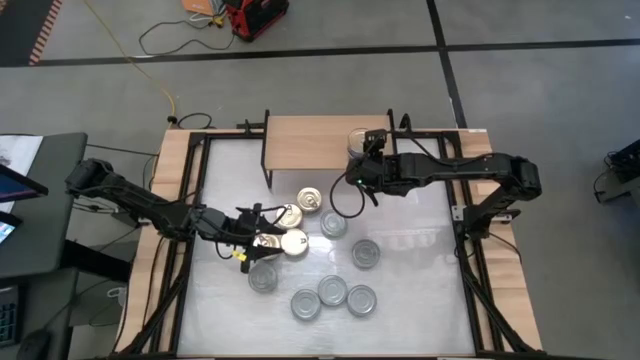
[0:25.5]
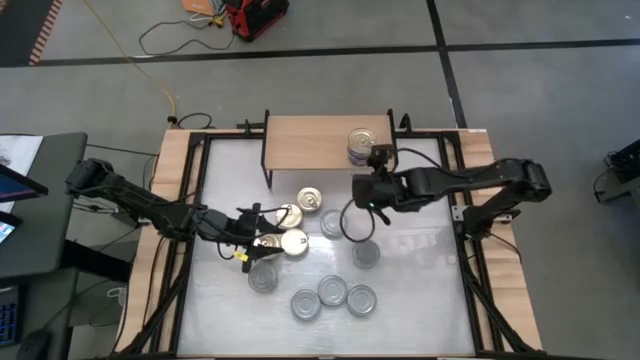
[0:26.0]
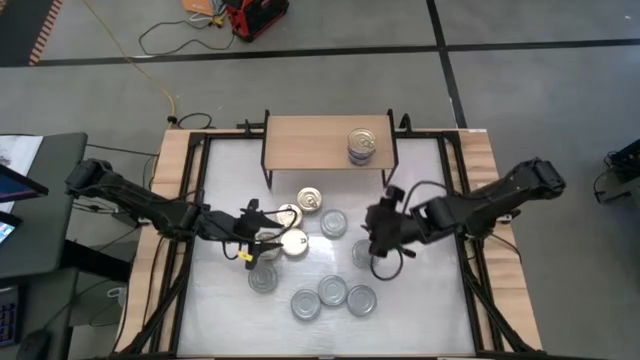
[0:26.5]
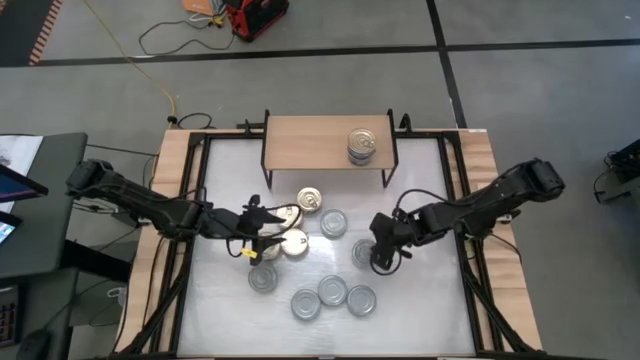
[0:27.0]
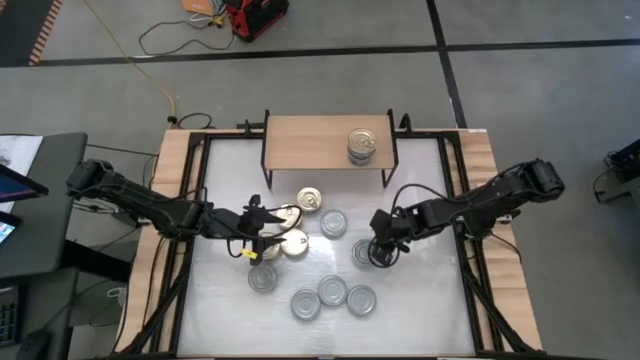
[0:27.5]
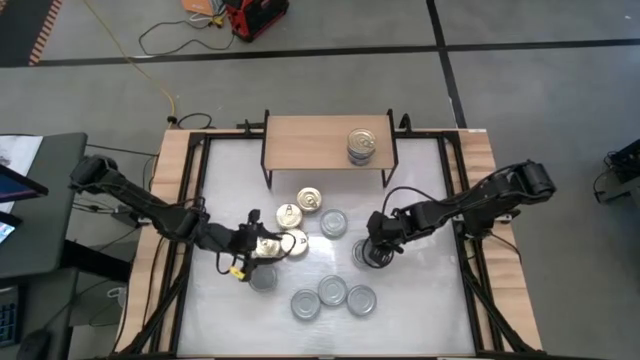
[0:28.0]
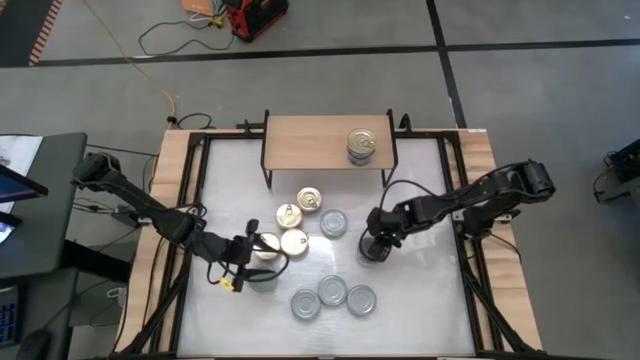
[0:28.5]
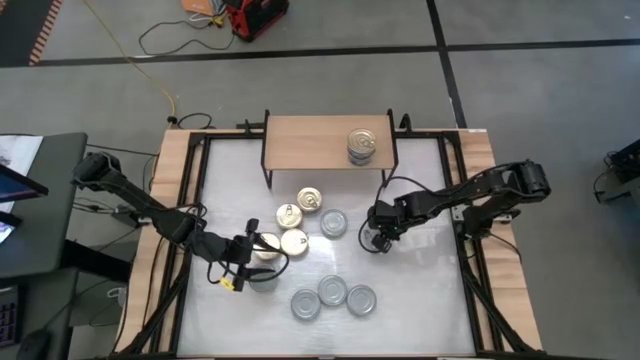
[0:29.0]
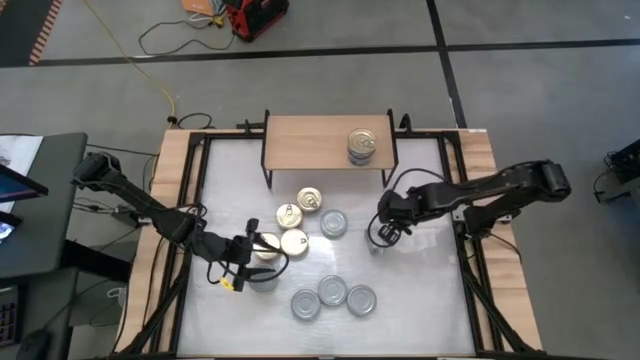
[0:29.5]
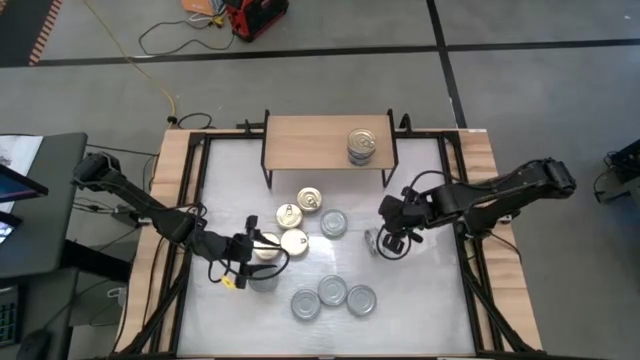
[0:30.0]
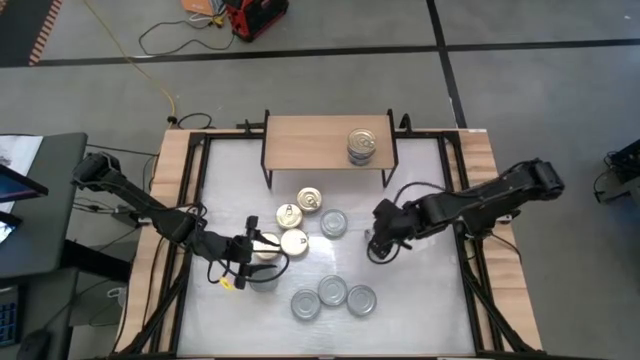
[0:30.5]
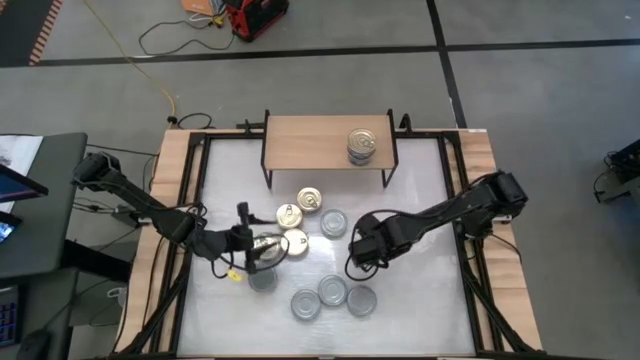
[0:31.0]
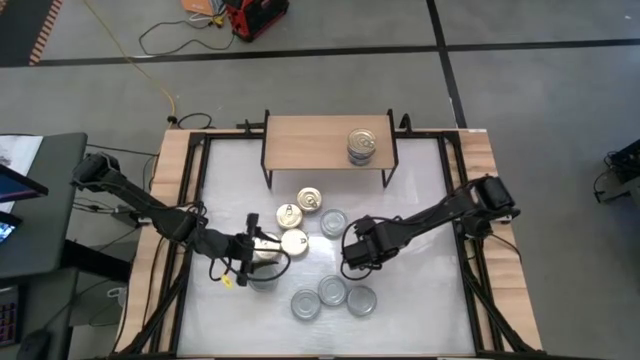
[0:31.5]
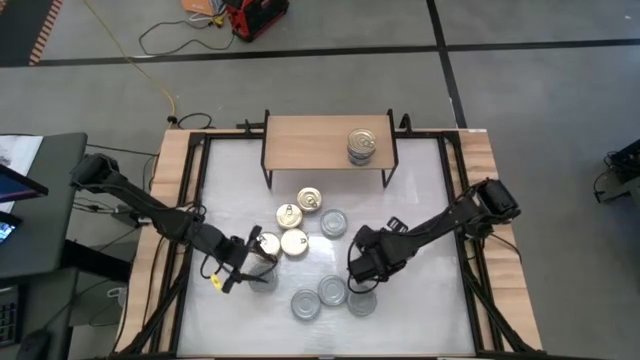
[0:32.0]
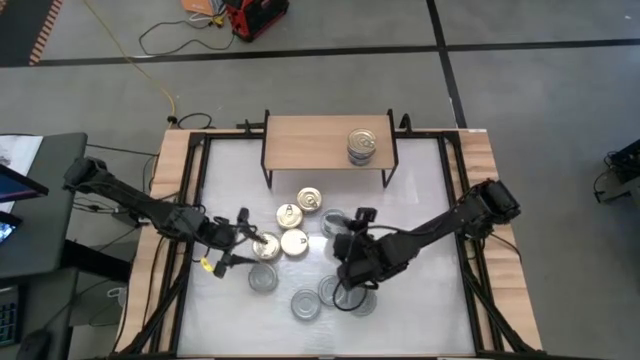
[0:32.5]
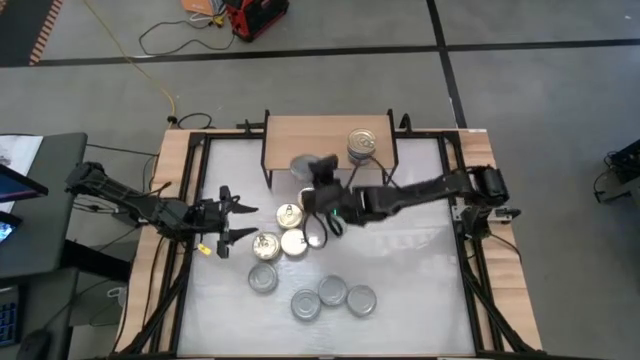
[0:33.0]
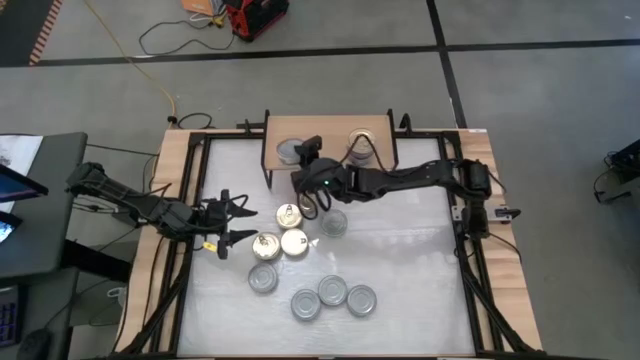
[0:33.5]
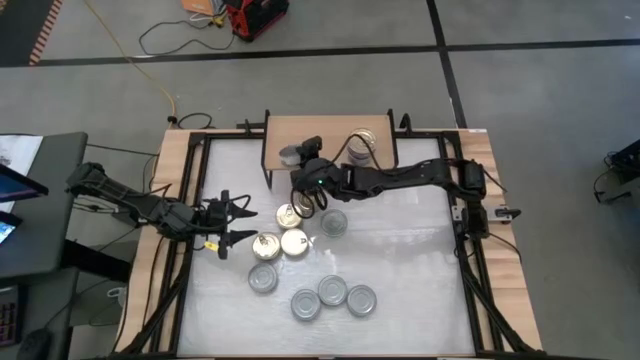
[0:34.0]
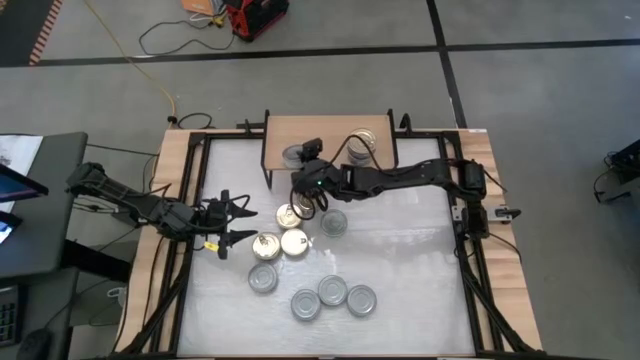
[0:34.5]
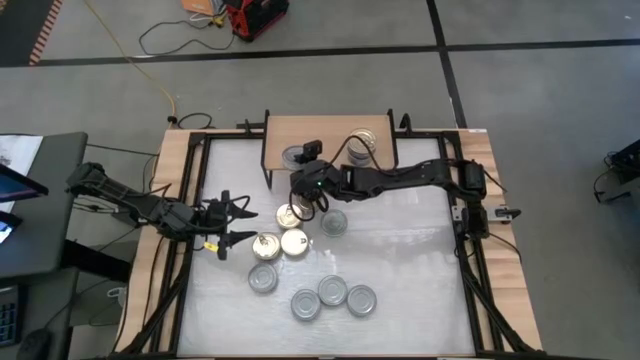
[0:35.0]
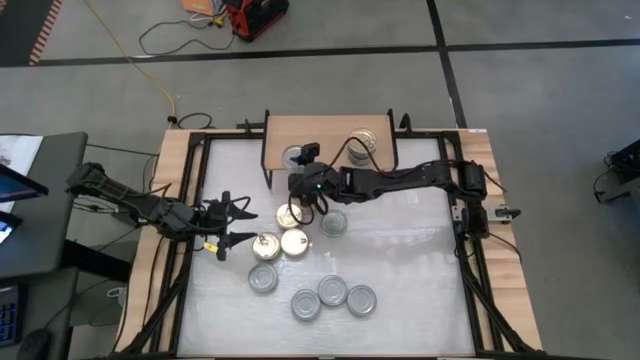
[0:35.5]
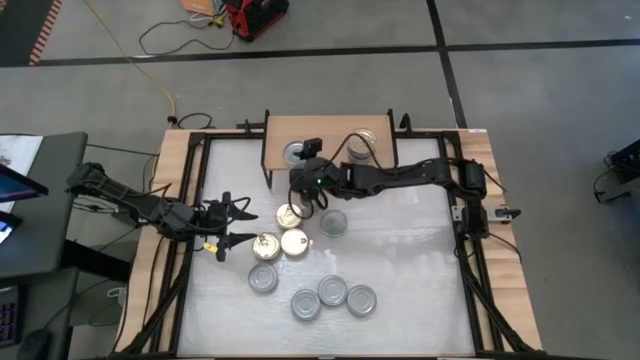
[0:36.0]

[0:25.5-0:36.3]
Task: Stack canned seafood by type on shelf
Put the green white tuna can on the shelf

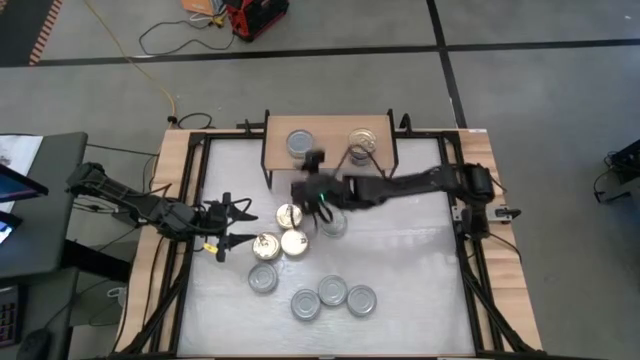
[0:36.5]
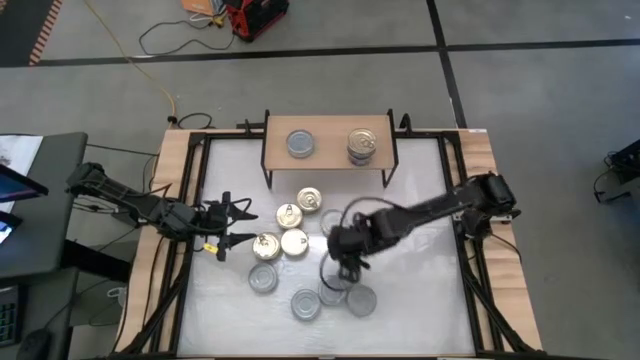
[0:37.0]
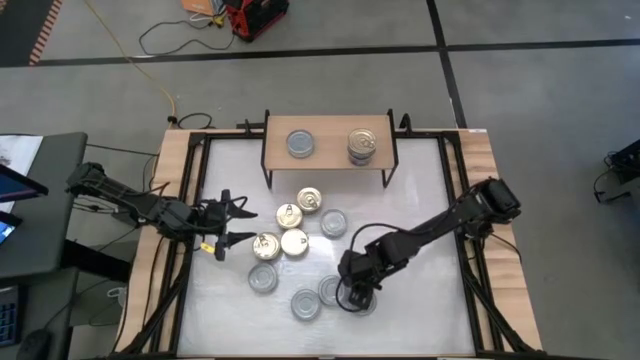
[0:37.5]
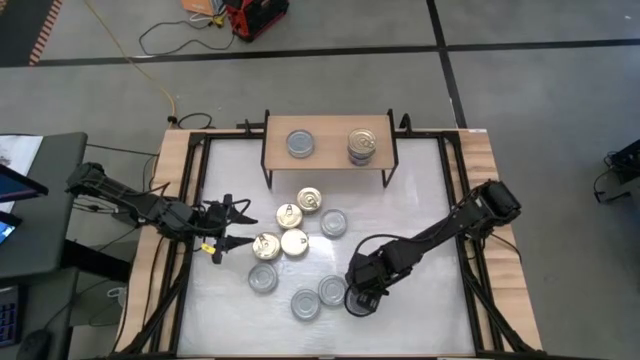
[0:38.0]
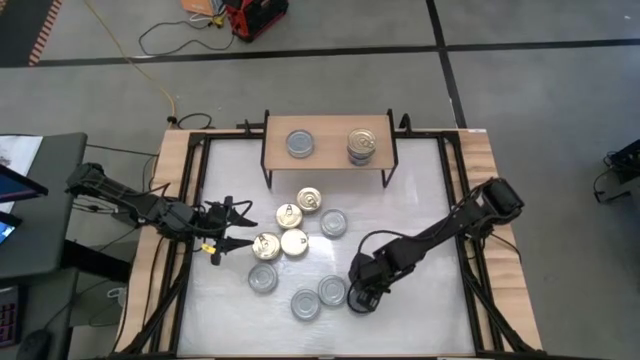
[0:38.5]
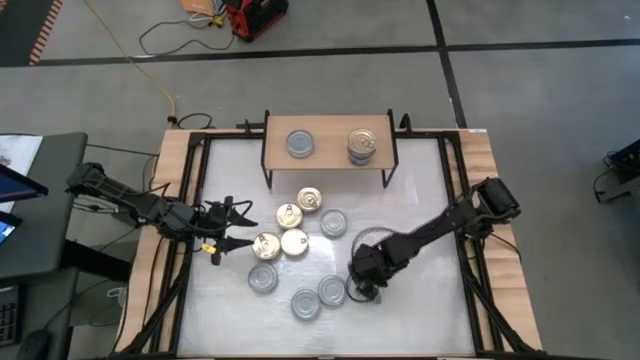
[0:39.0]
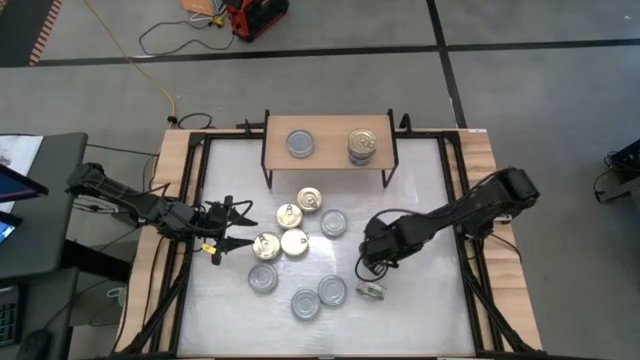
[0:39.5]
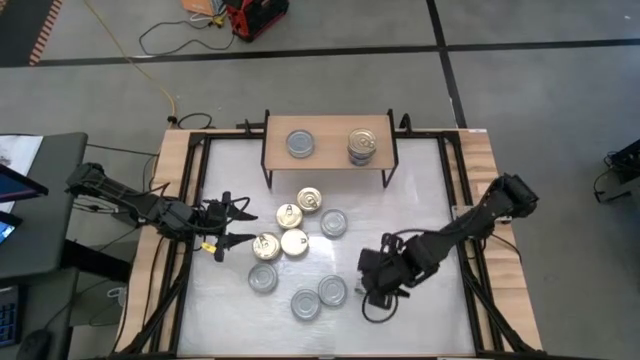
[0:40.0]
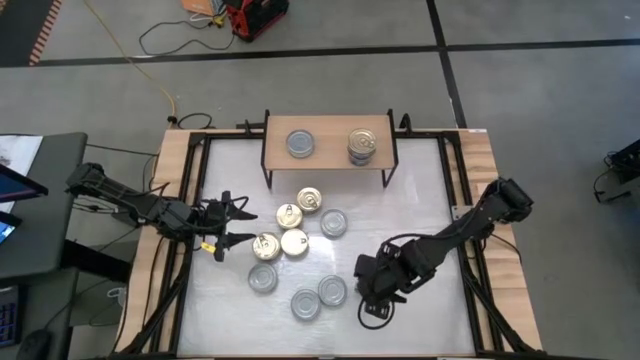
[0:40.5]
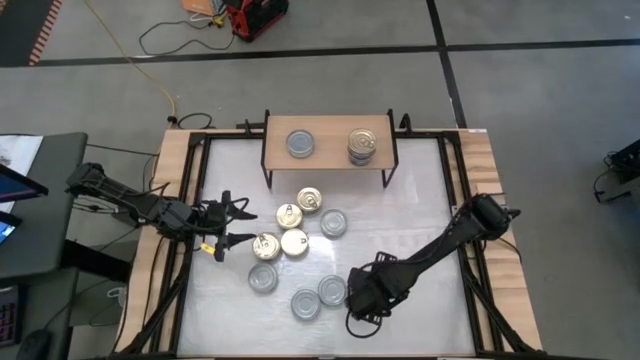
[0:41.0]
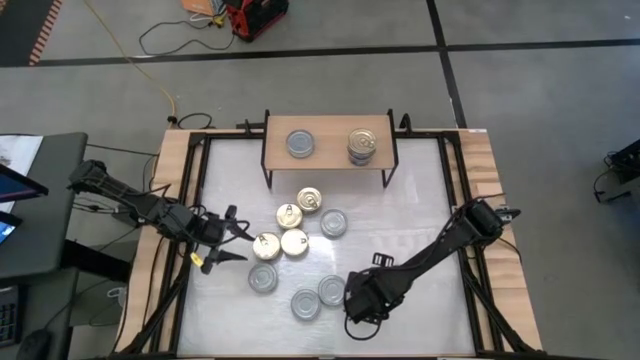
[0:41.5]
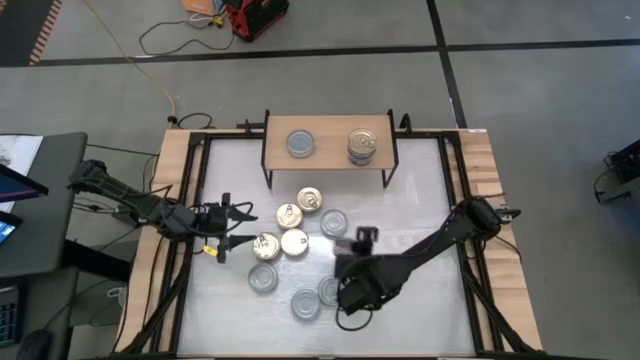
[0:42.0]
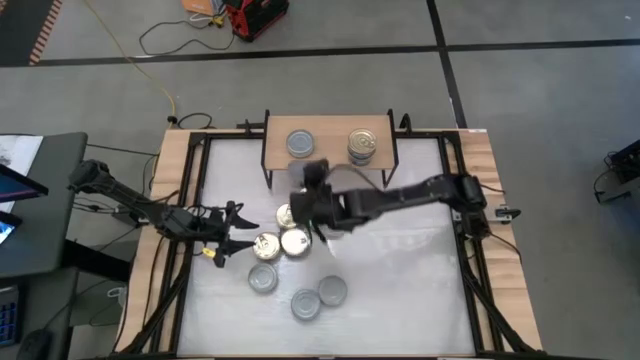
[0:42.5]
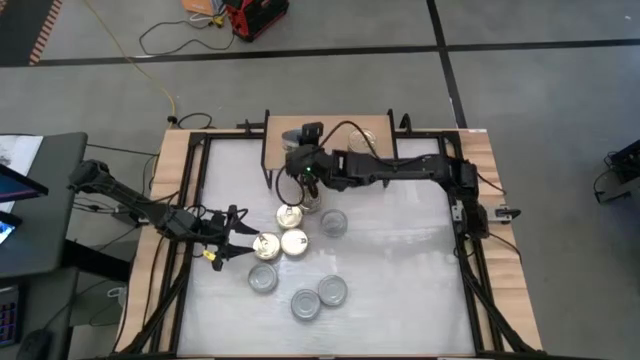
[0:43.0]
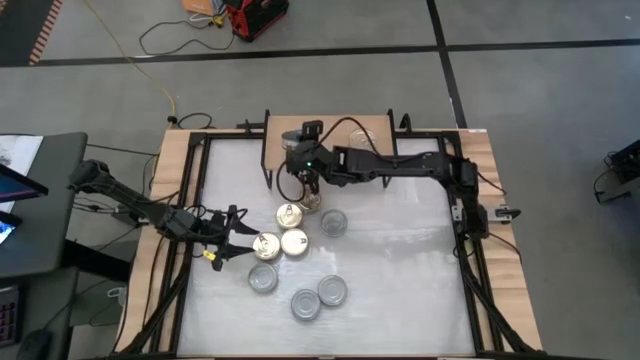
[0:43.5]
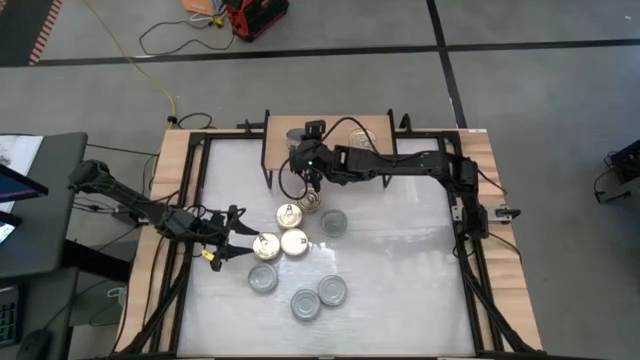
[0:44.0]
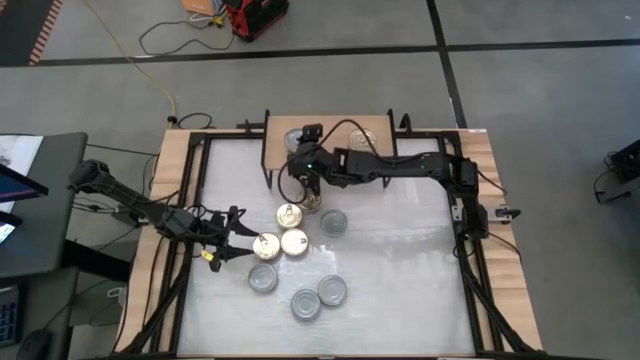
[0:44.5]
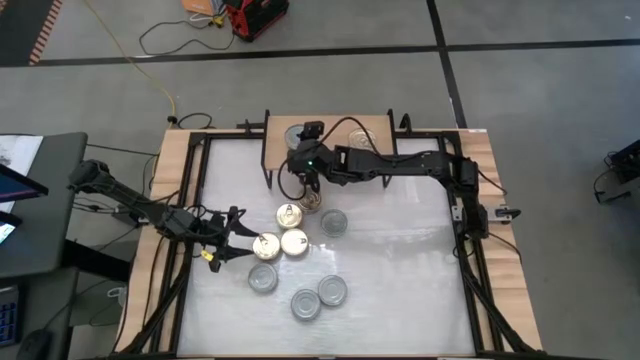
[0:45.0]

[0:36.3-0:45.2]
Stack the green white tuna can on top of the other green white tuna can on the shelf

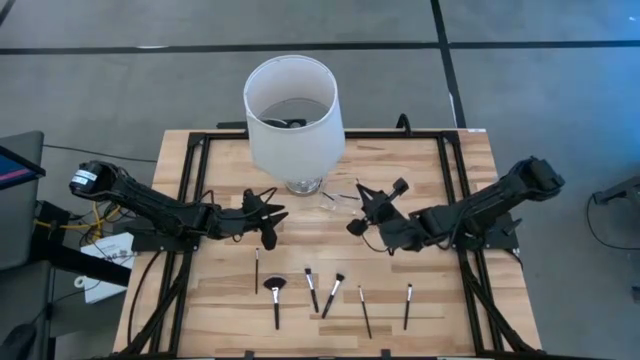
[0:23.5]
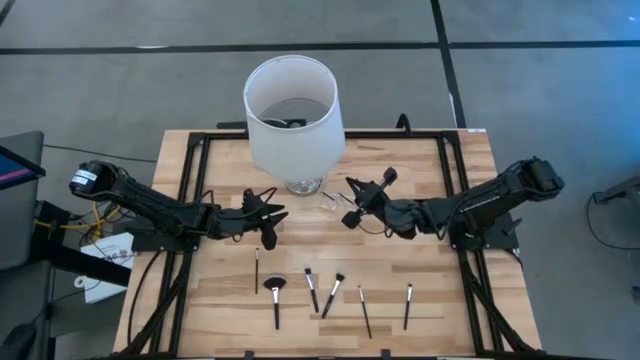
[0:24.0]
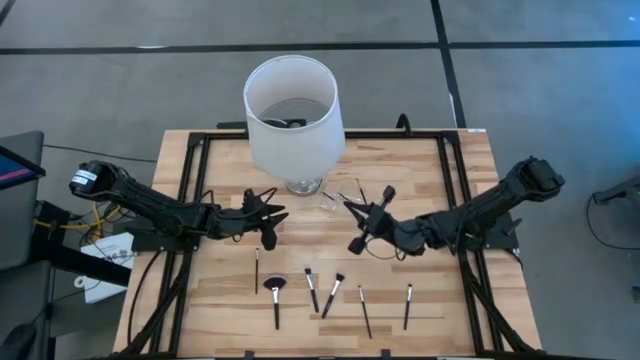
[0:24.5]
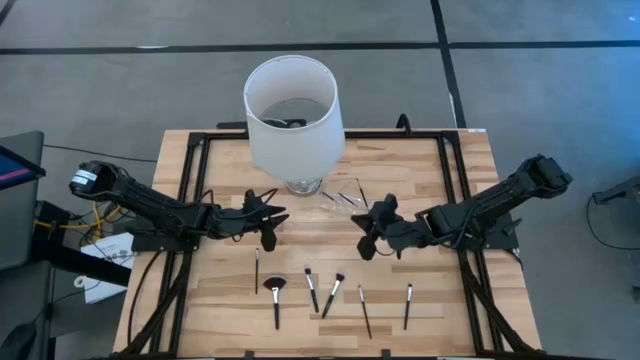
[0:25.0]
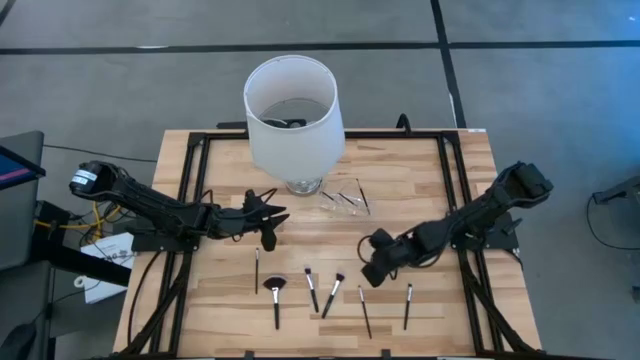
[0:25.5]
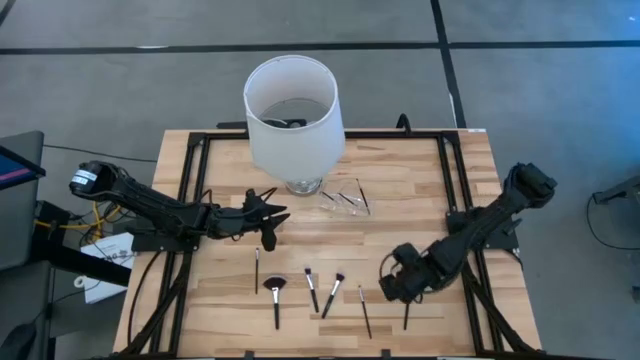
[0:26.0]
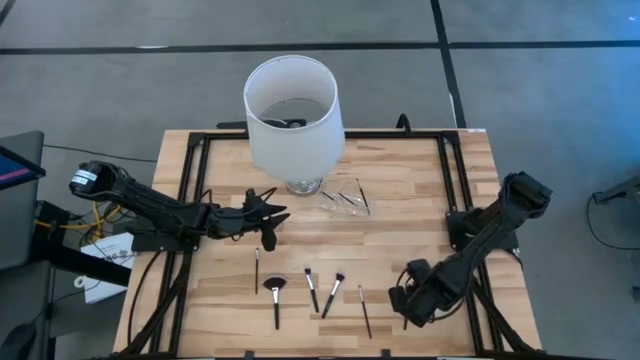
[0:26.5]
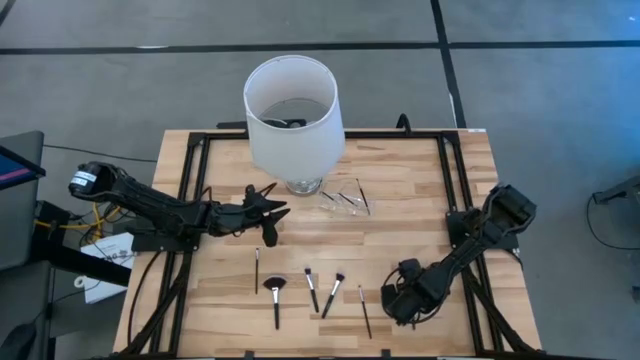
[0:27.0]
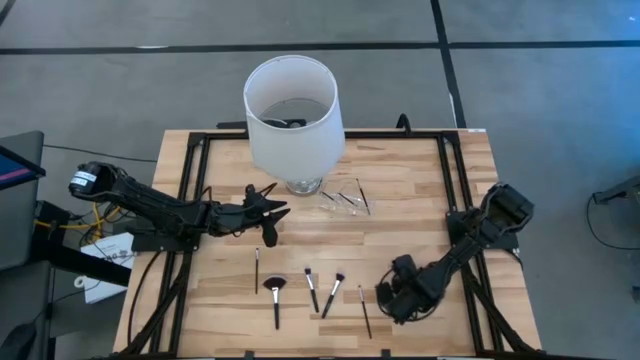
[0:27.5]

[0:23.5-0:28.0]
Task: Put items in baskets/containers
Put the black eyeshadow brush into the transparent organizer
